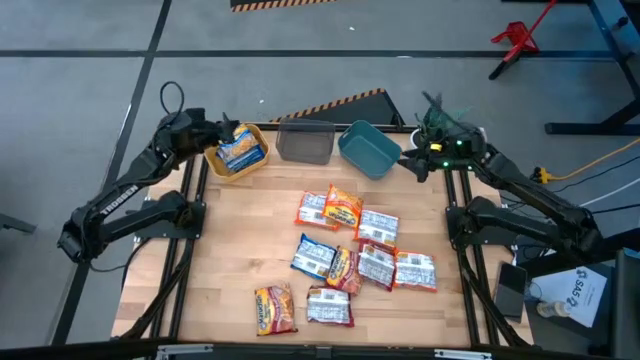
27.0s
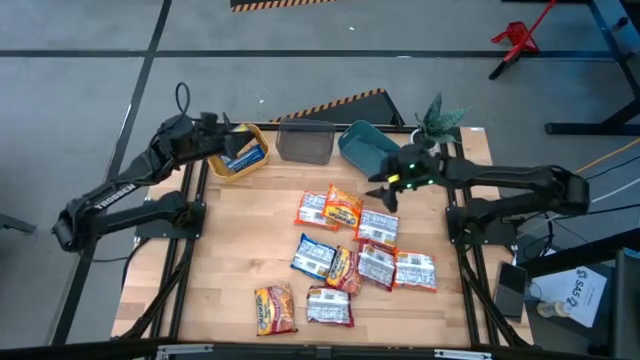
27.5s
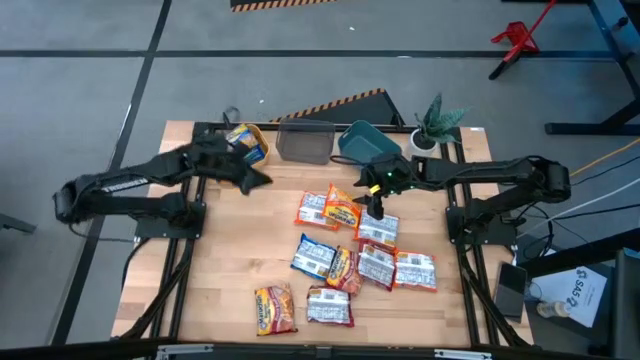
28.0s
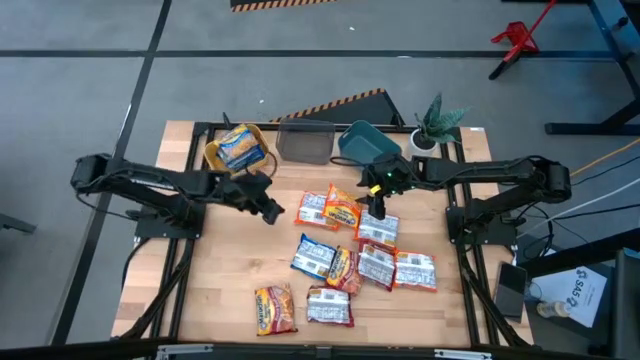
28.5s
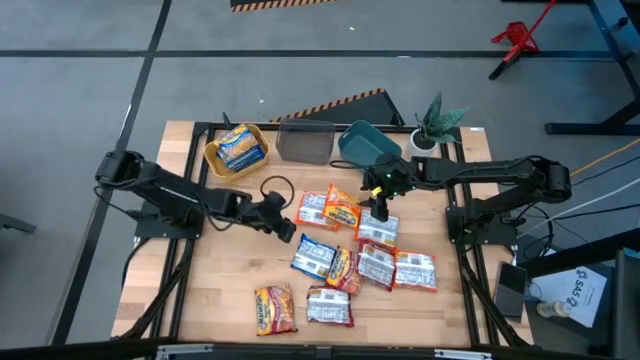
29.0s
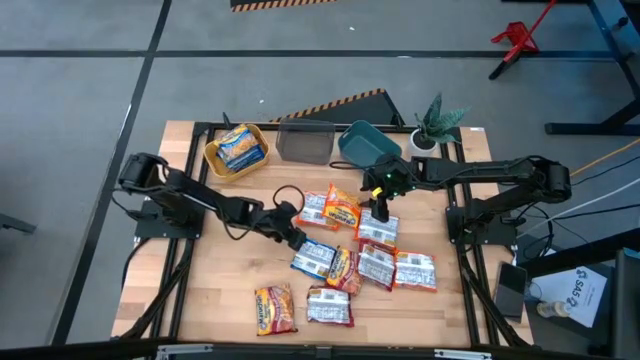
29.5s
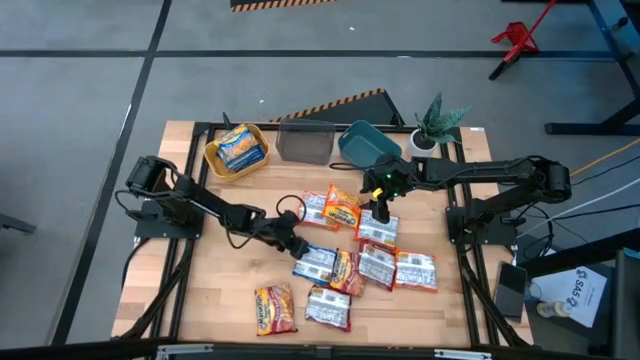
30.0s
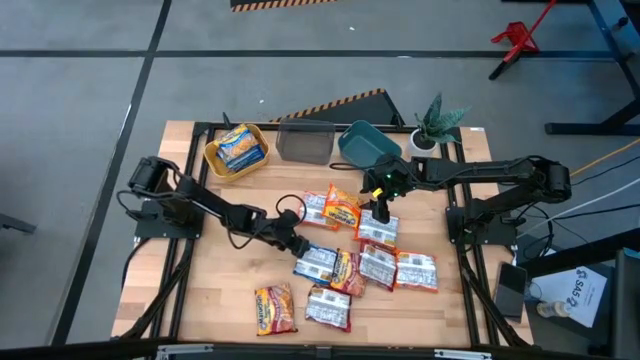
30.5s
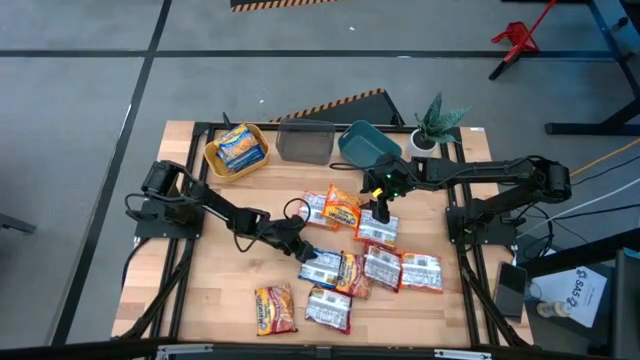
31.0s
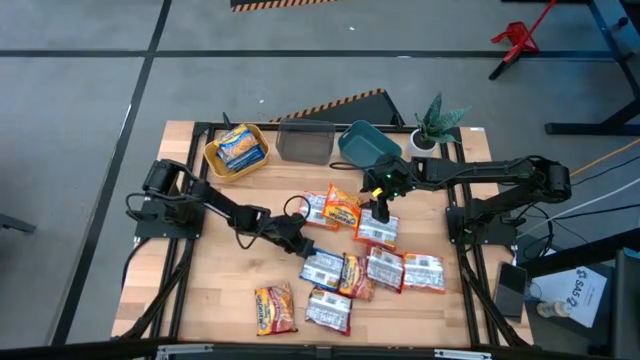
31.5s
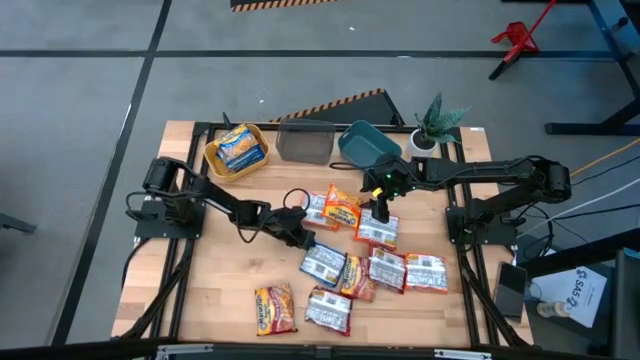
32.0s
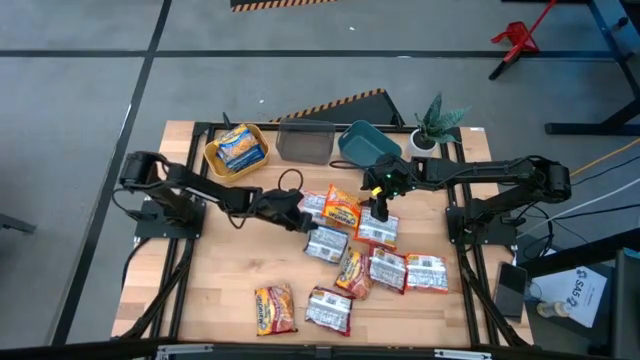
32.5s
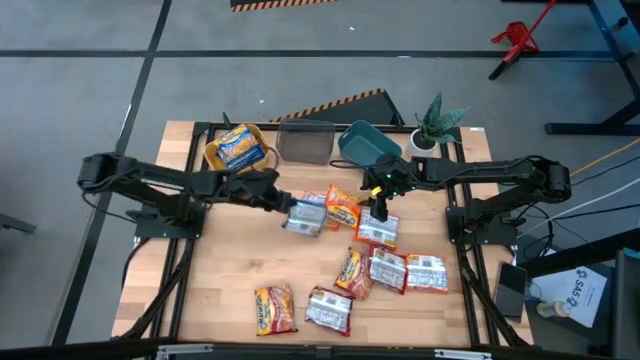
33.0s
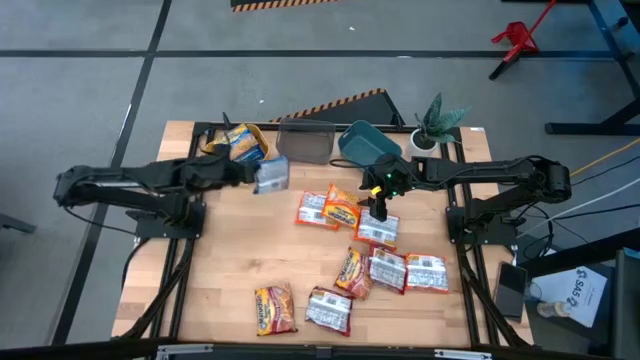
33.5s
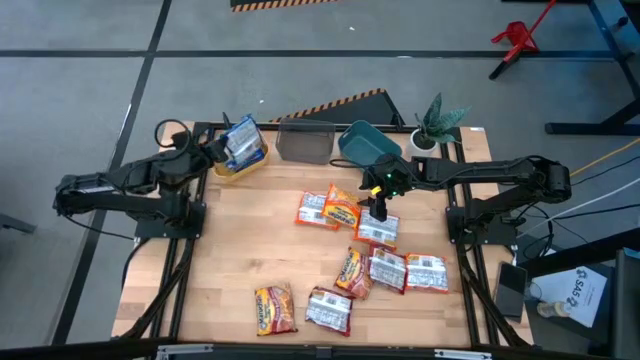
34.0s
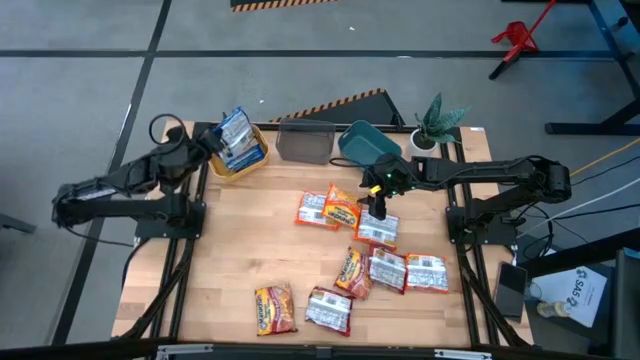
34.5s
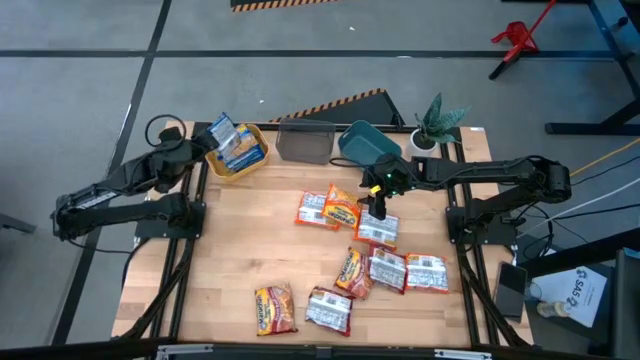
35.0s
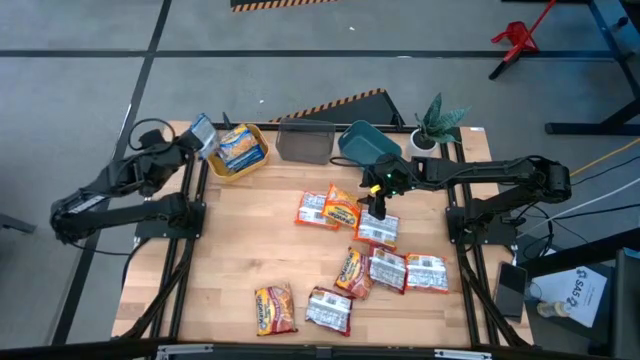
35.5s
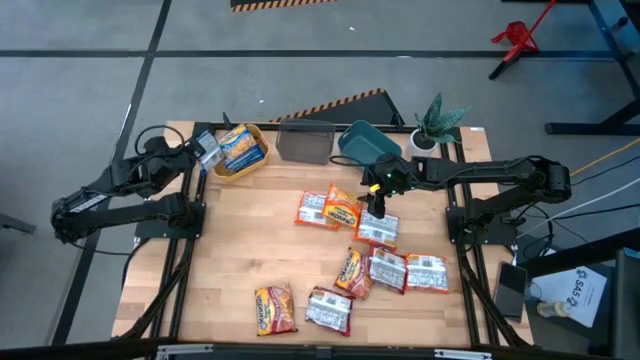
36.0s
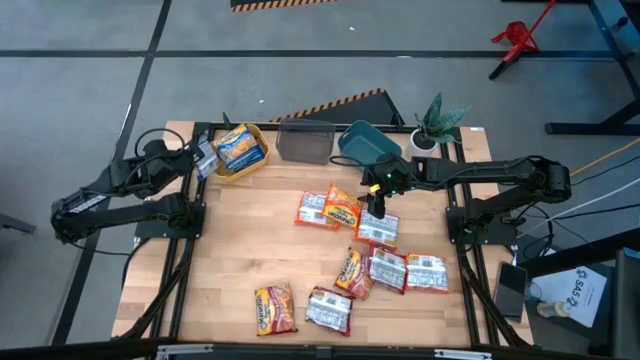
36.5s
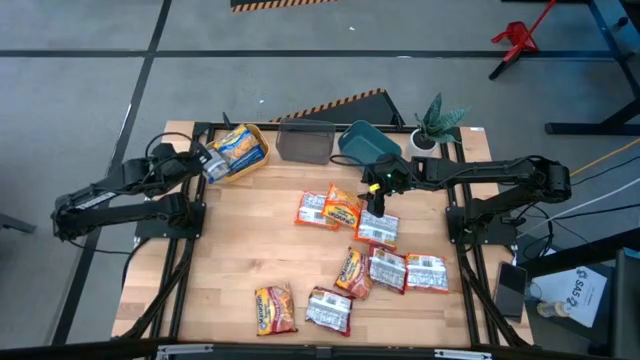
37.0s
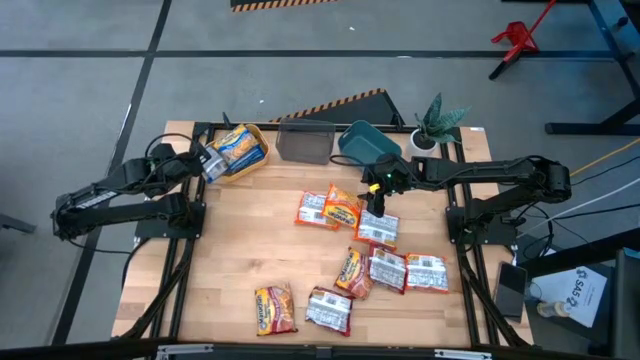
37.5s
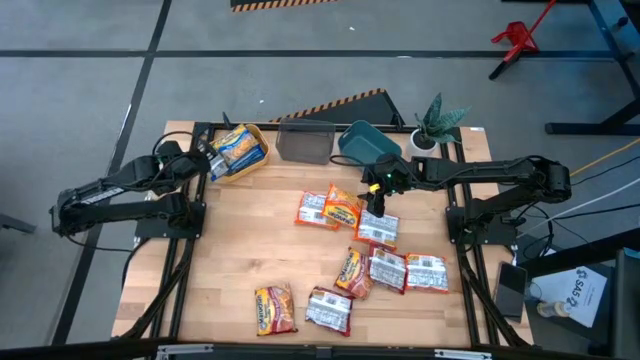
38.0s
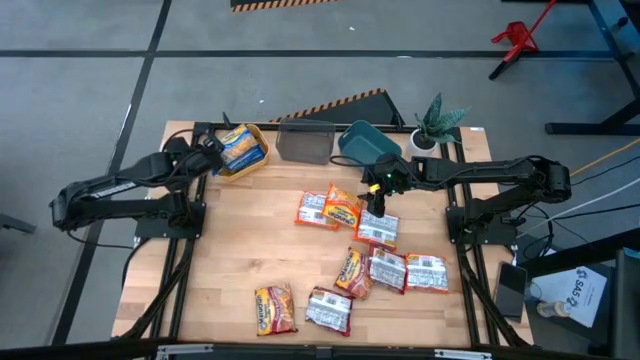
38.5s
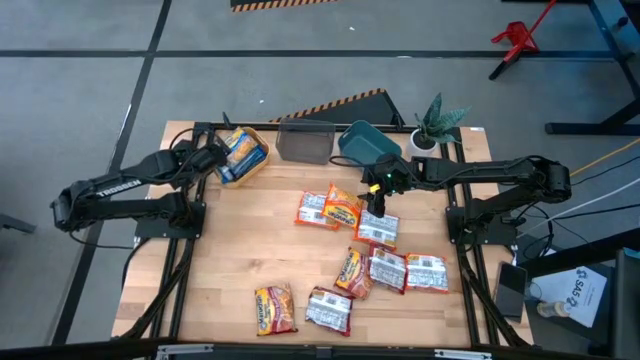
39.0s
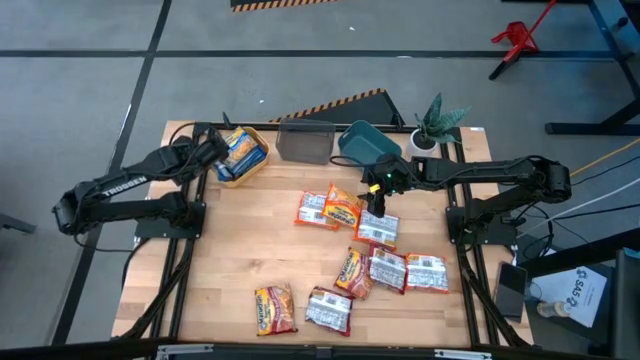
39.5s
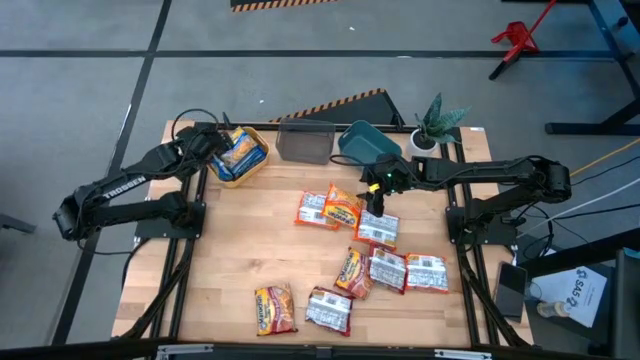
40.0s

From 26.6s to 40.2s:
Task: Sort Maruchan noodles
Put the blue noodle pack into the yellow bin

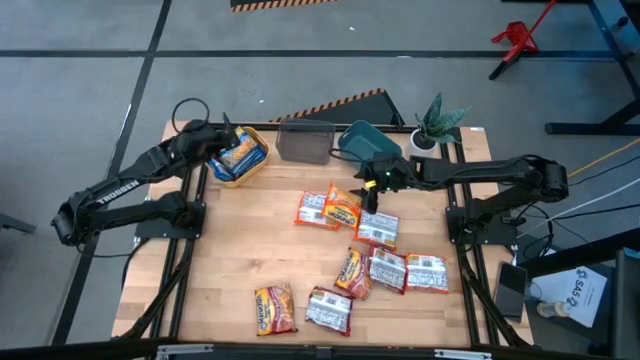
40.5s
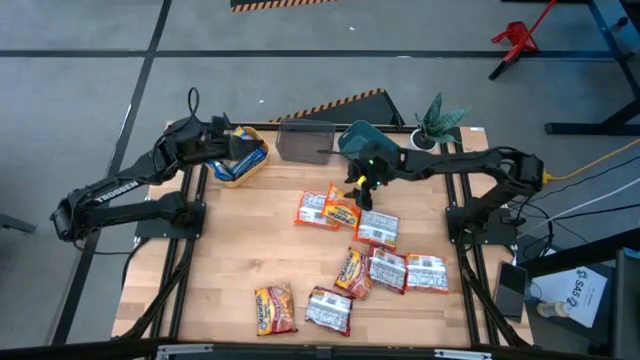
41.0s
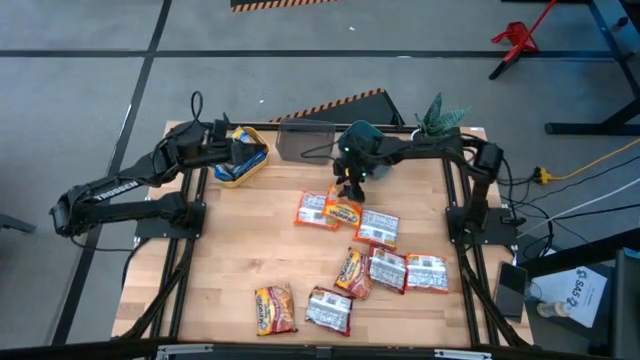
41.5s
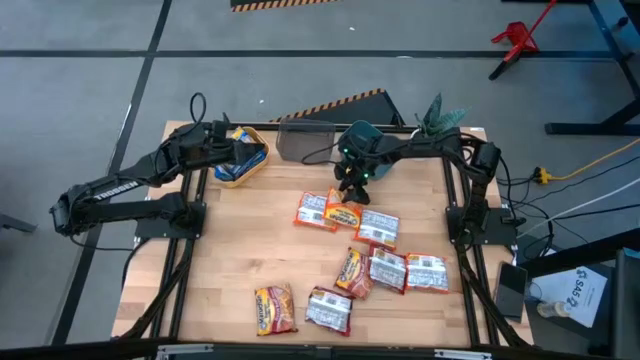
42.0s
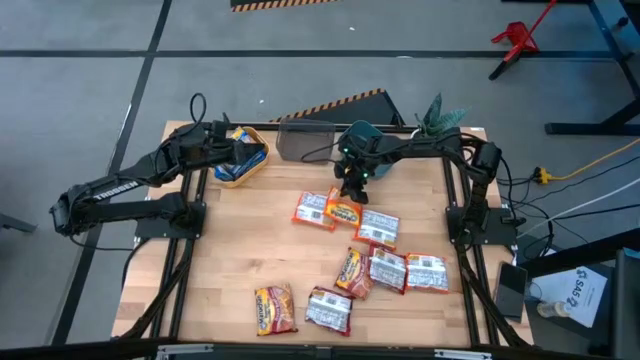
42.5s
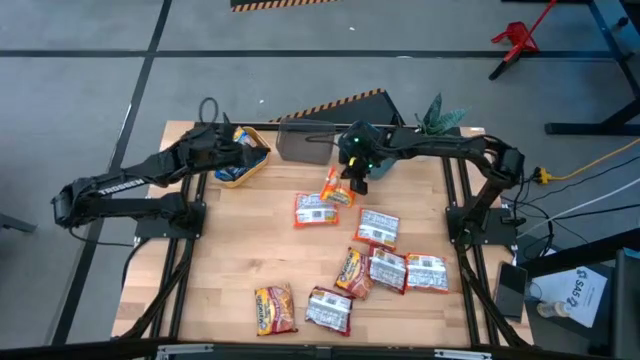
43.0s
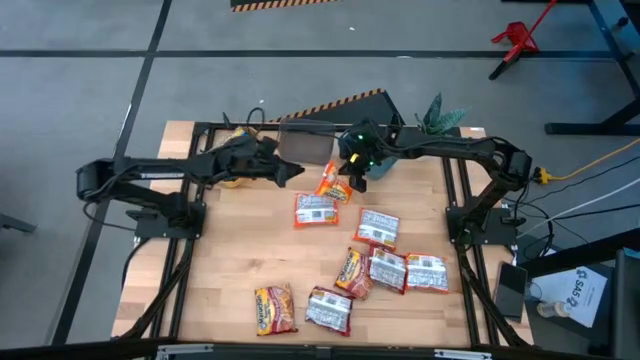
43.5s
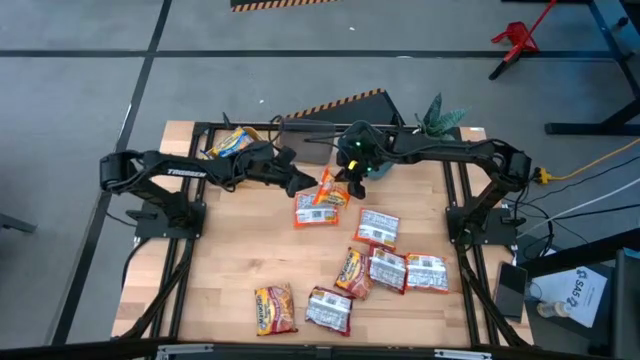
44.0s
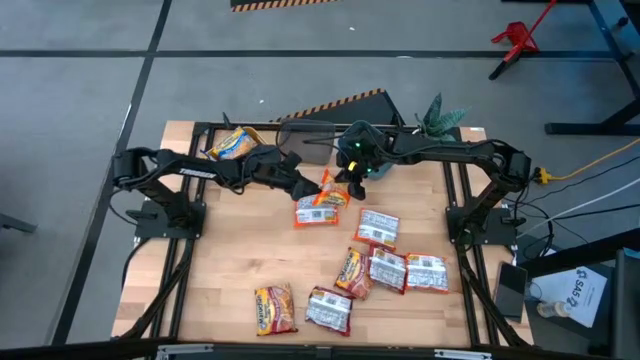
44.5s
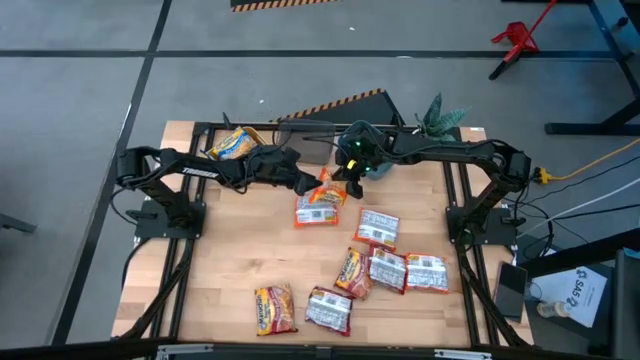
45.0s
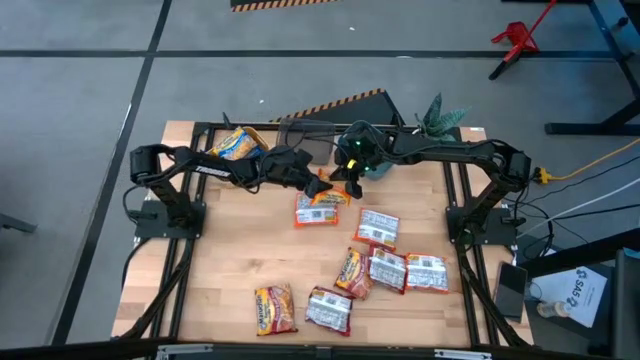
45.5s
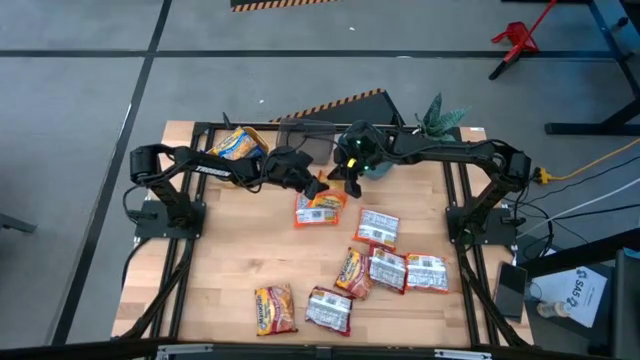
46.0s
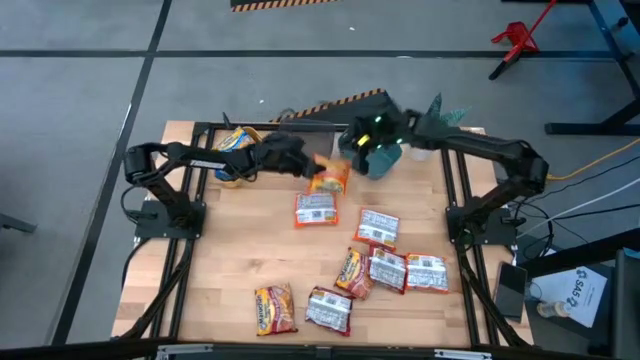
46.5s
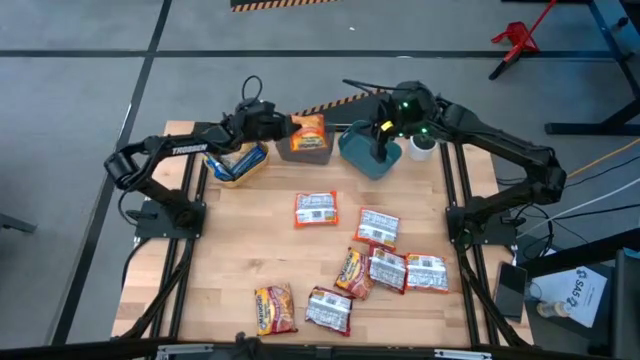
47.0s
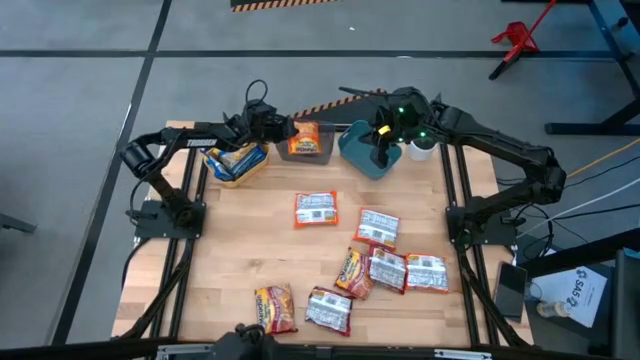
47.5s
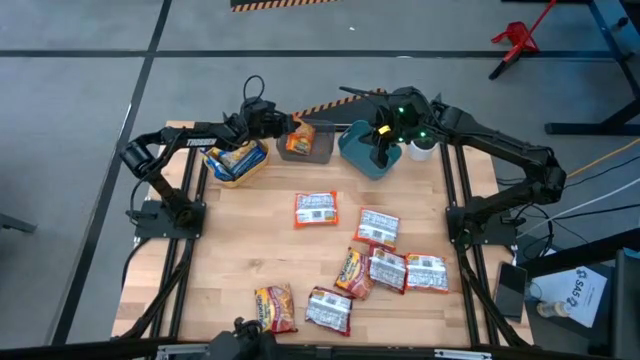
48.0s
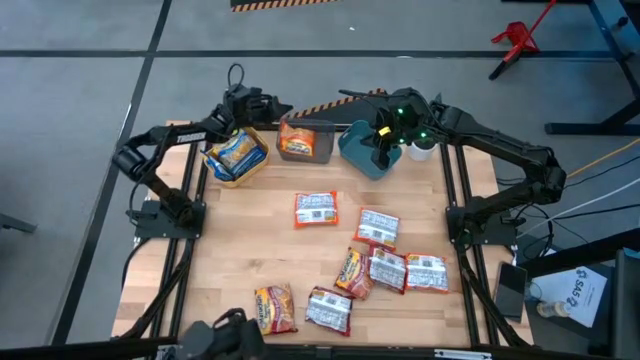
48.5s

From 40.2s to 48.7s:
Put the orange noodle pack into the black bin
